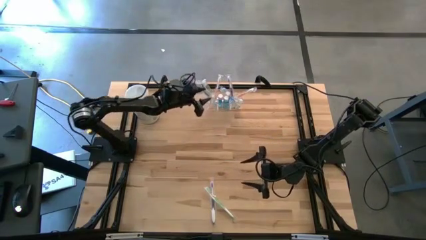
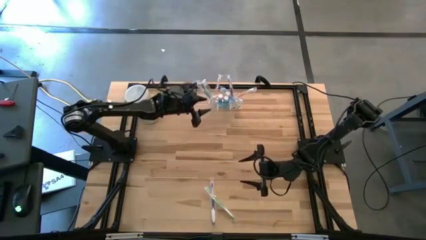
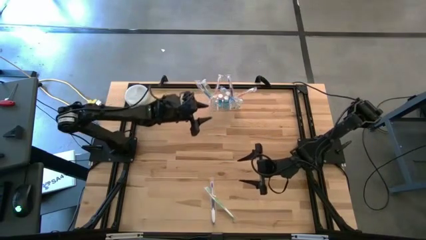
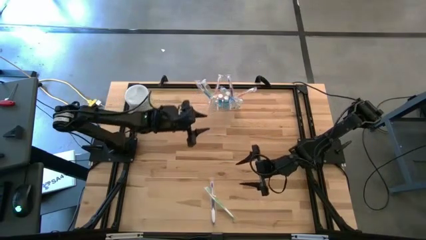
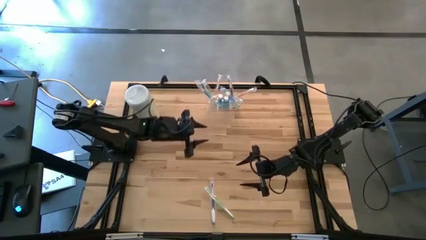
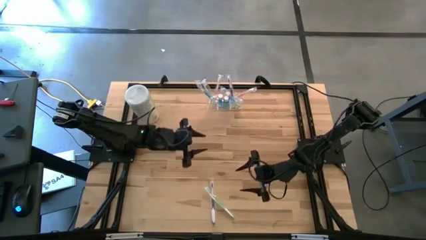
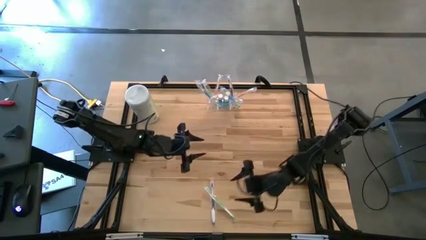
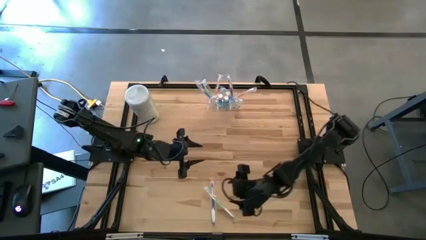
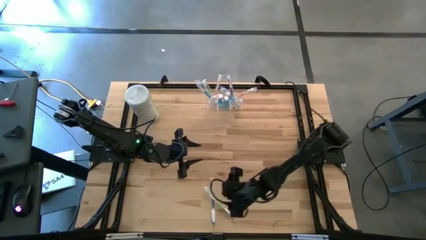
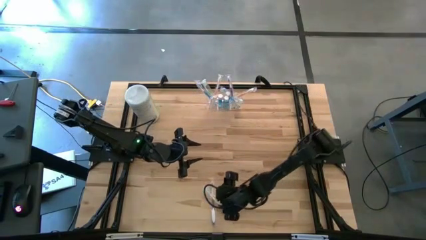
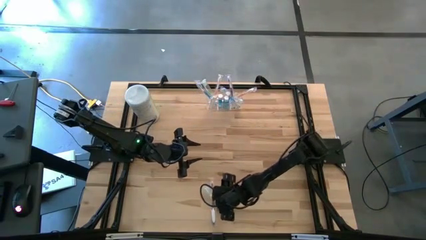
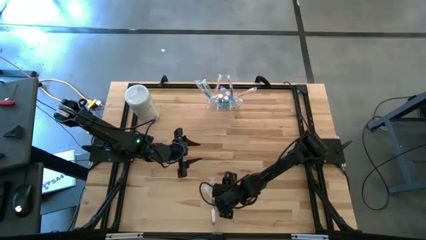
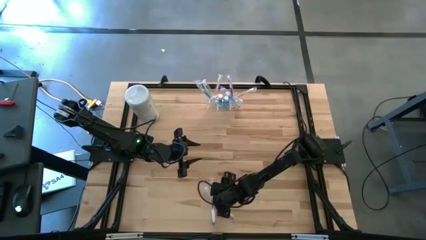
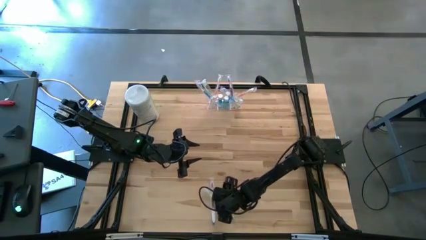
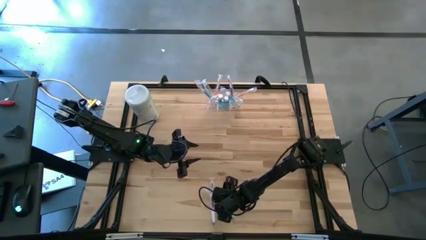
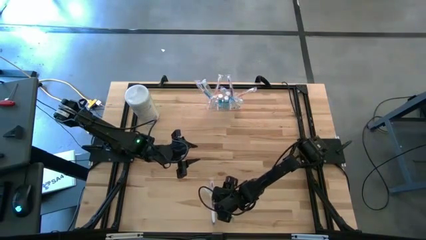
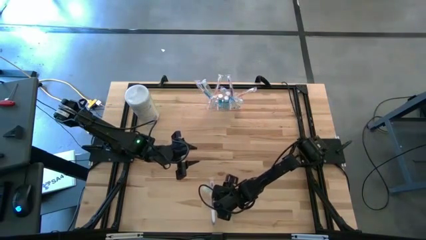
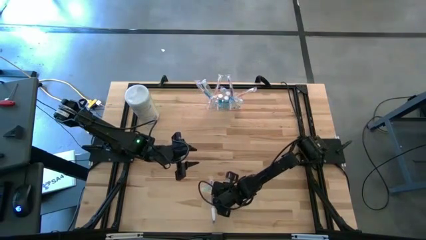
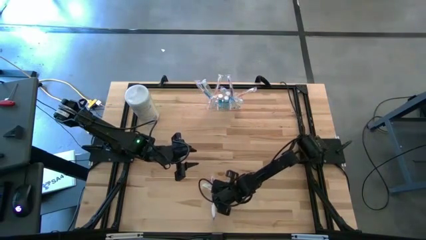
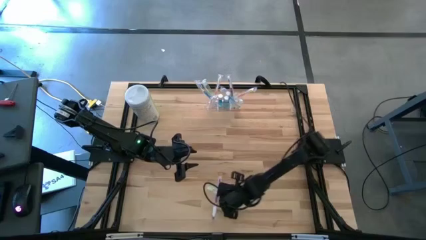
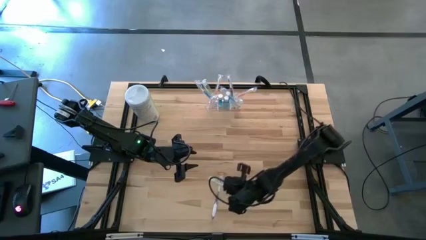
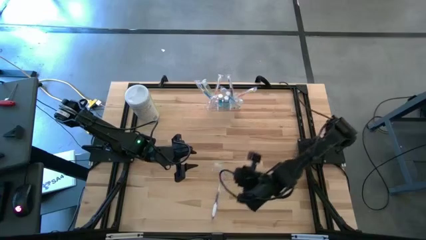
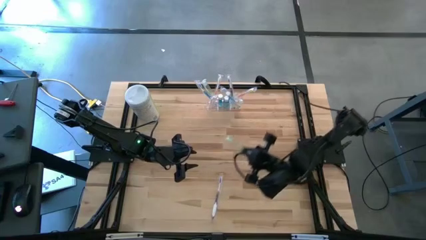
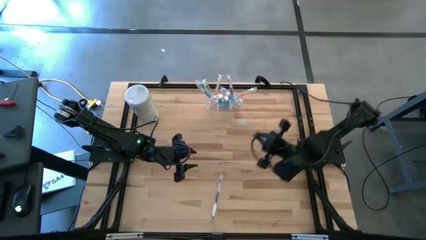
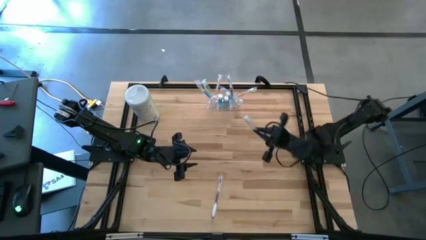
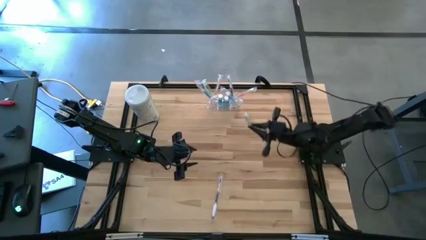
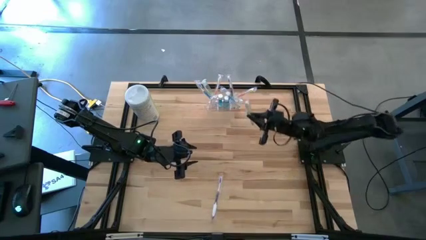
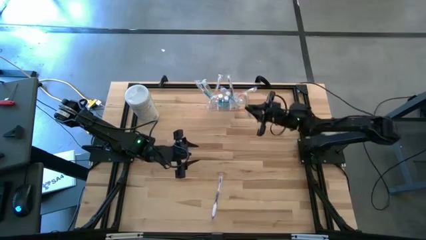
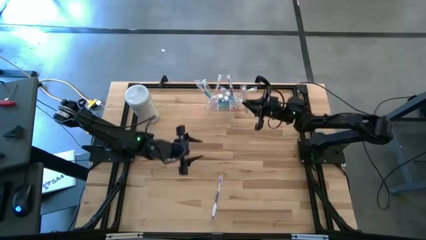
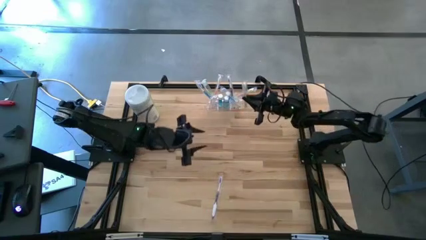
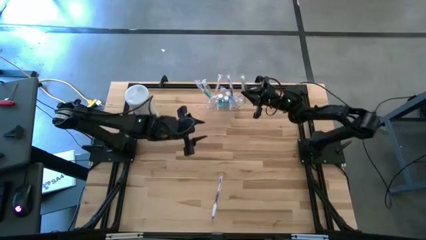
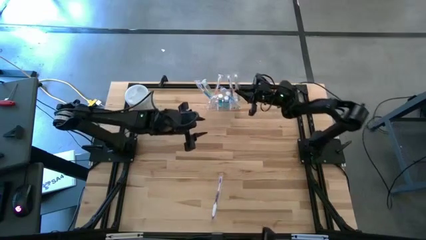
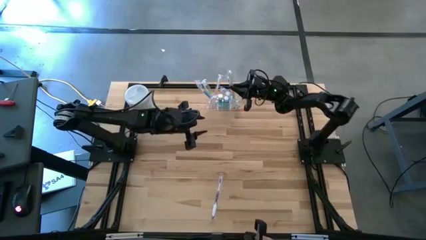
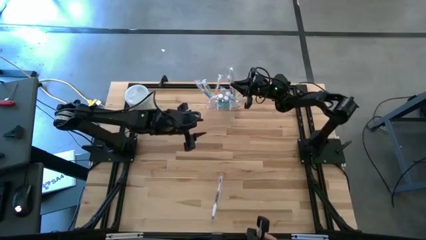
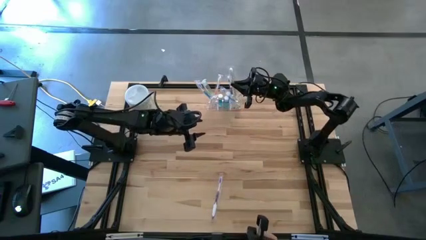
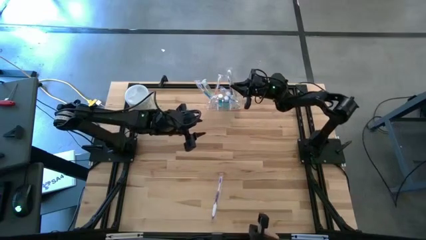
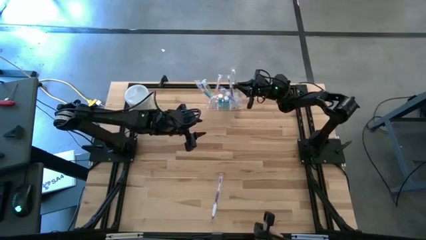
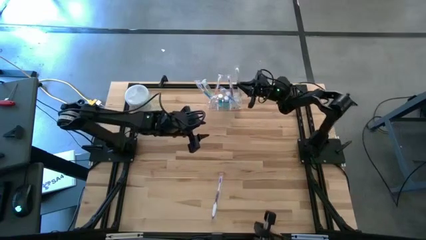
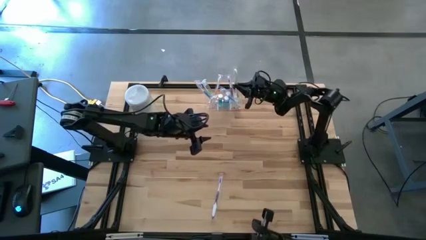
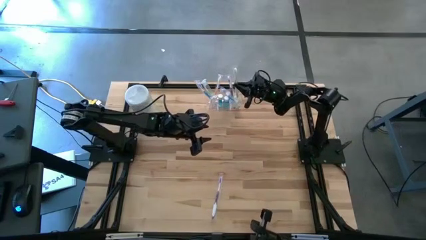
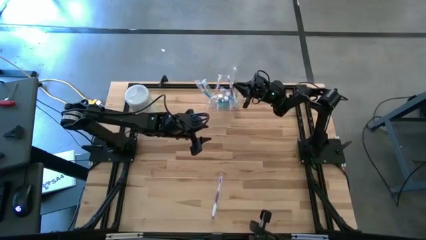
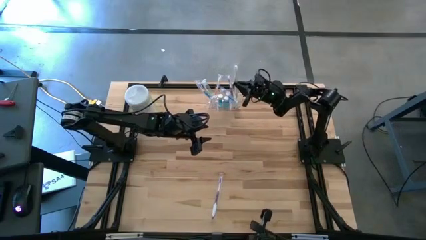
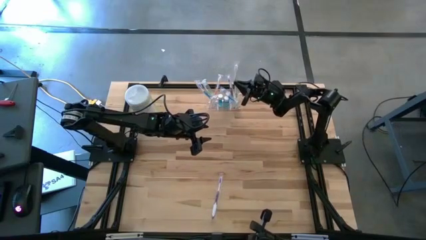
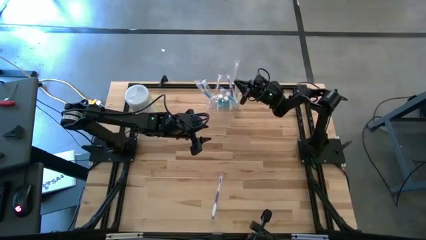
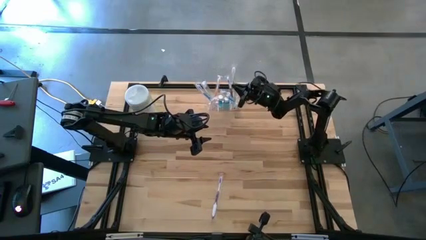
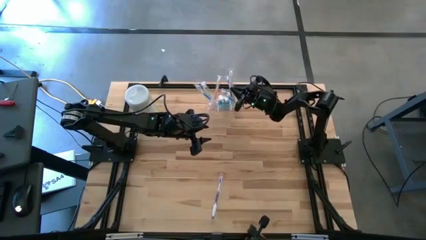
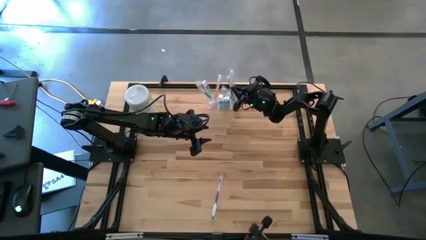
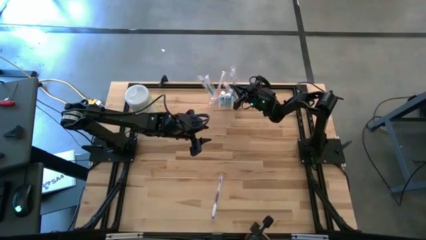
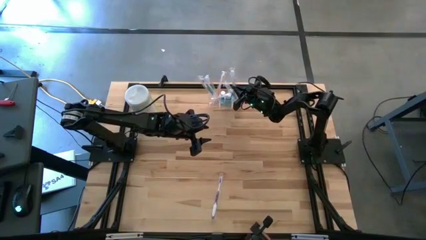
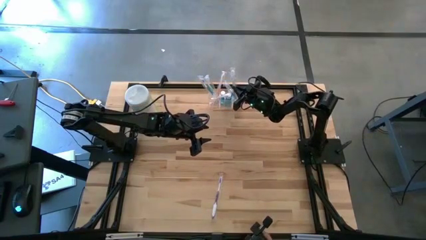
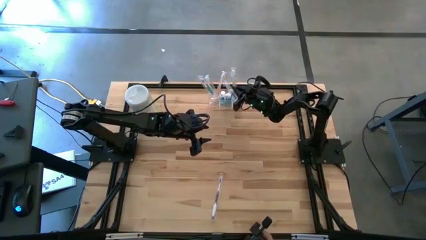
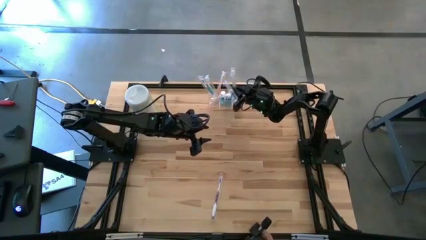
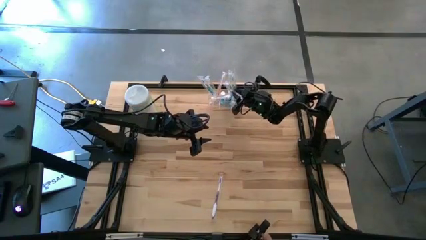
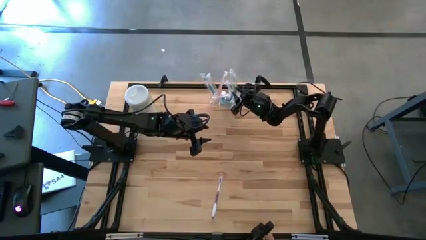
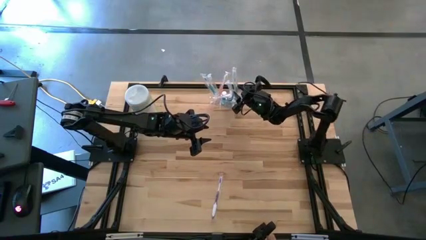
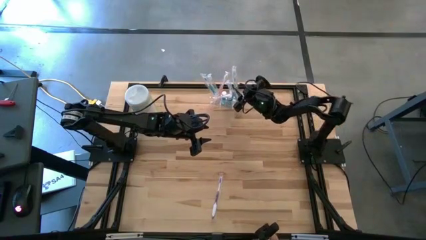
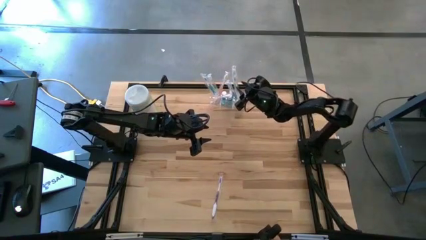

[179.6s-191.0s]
Task: Pick & Place toothbrushing station
Put the green toothbrush into the transparent organizer

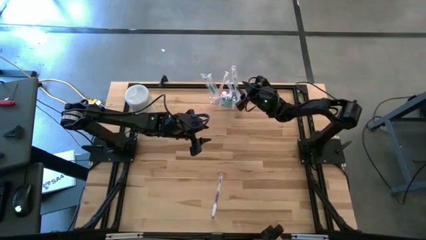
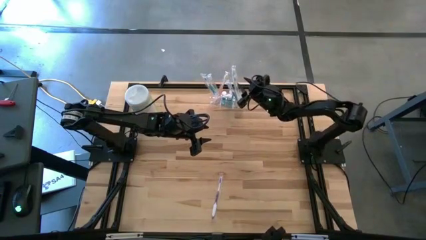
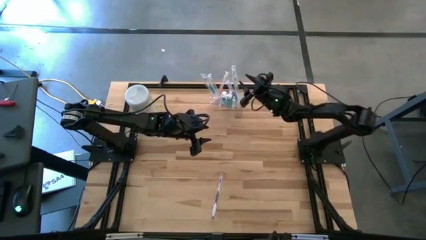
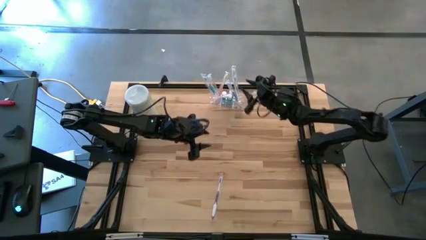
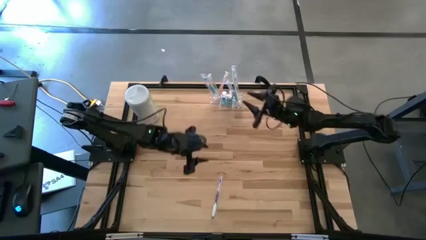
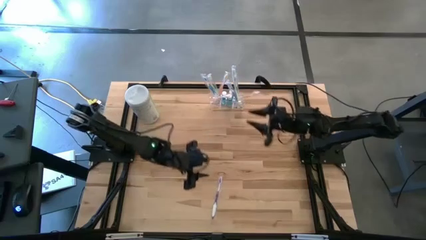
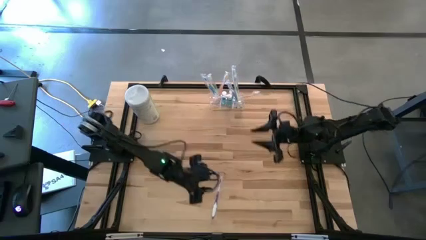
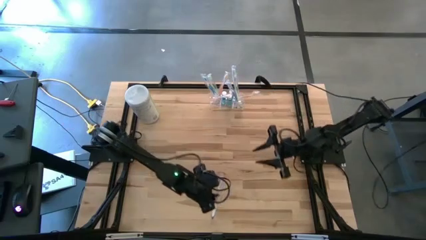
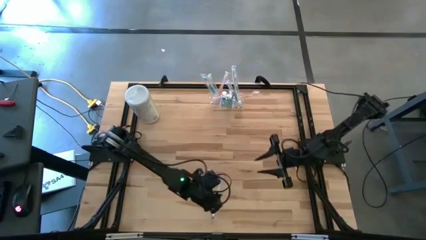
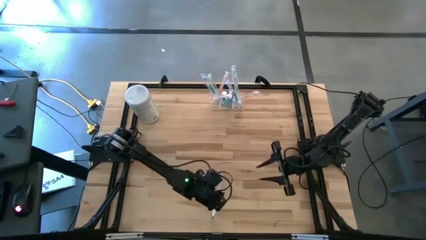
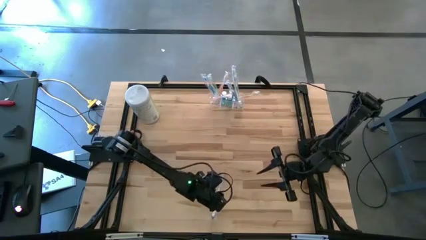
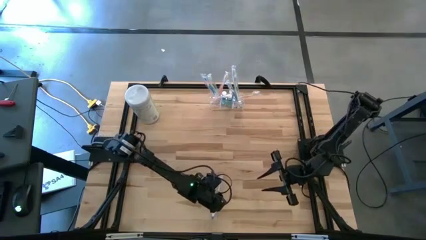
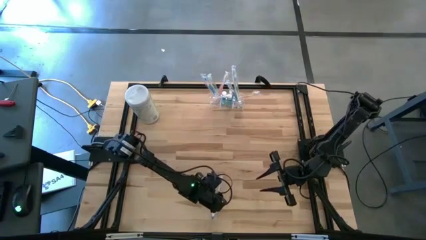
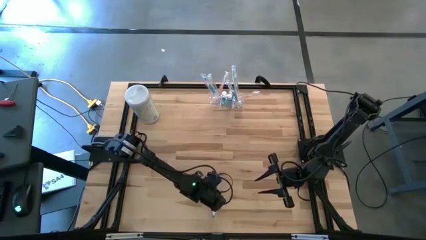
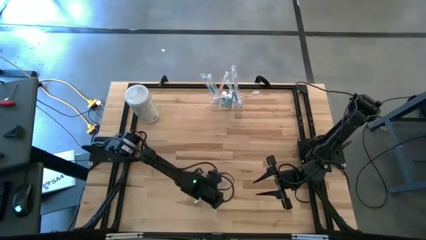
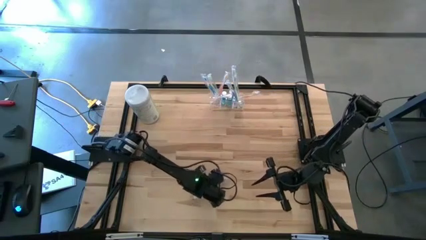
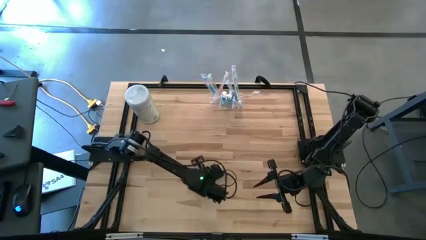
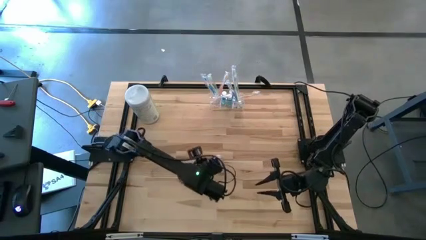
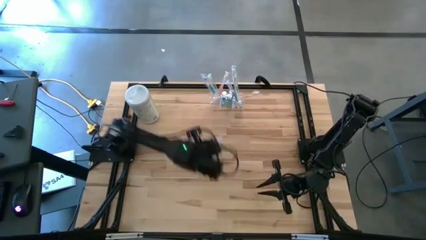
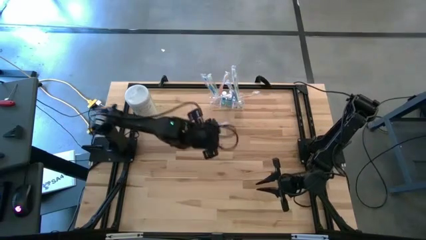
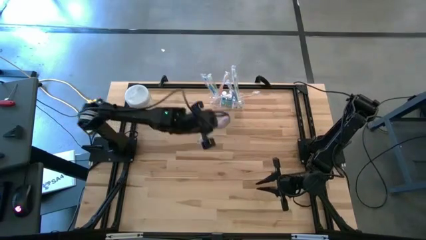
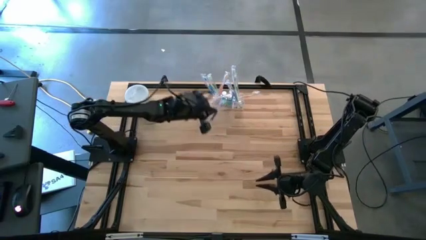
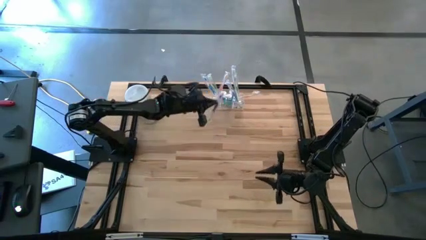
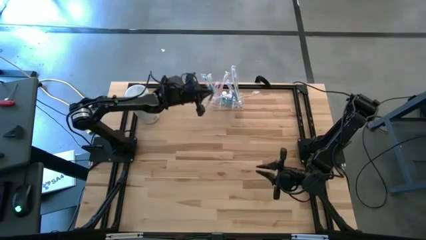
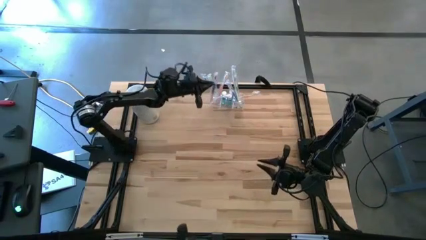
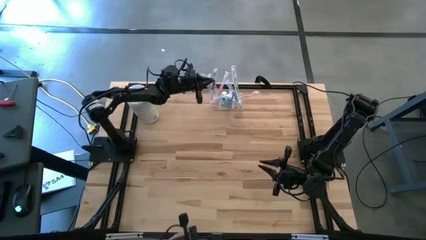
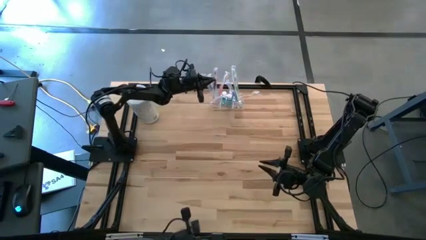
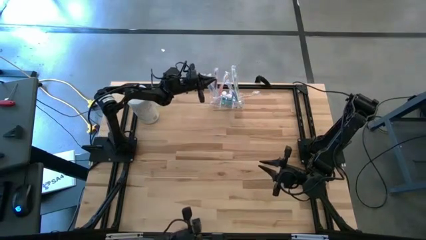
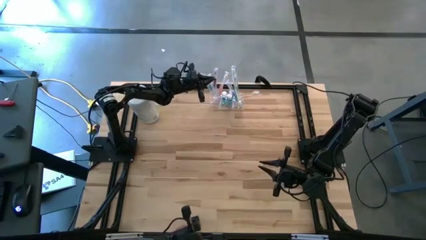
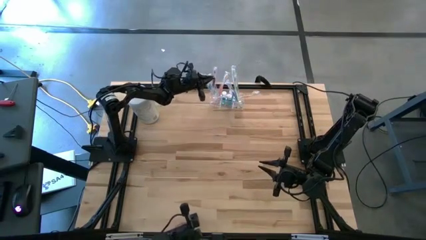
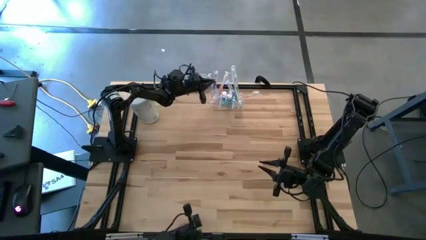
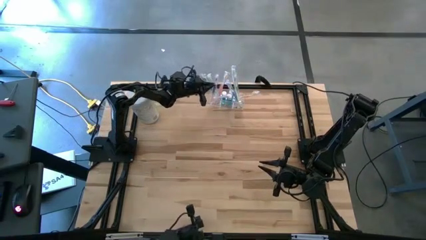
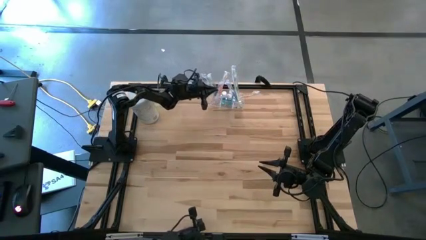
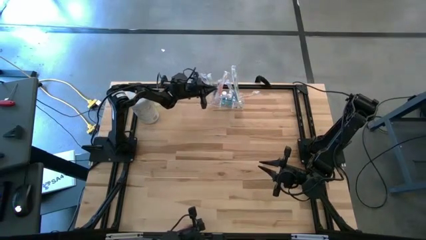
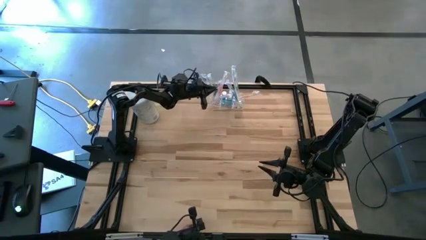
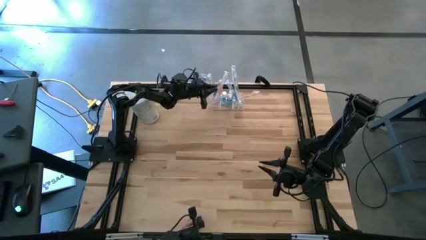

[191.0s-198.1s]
Put the purple toothbrush into the transparent organizer
